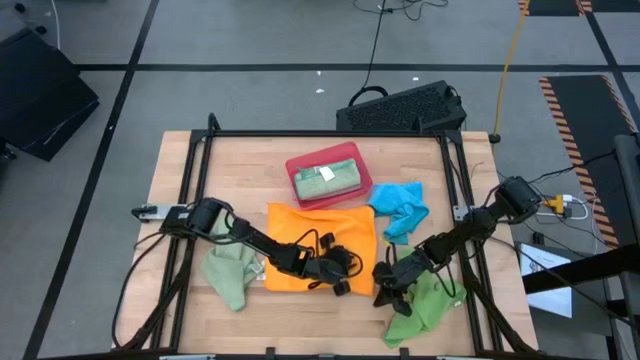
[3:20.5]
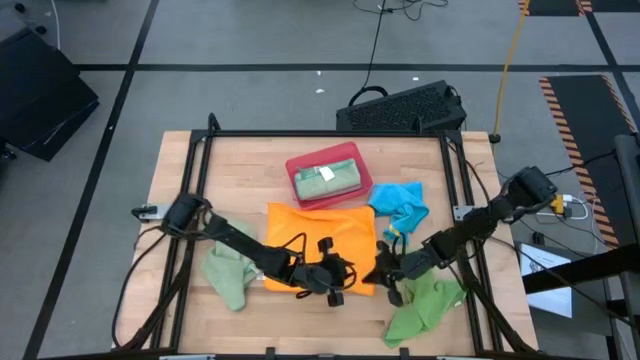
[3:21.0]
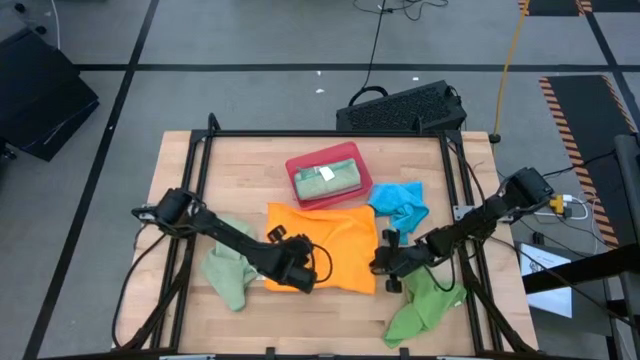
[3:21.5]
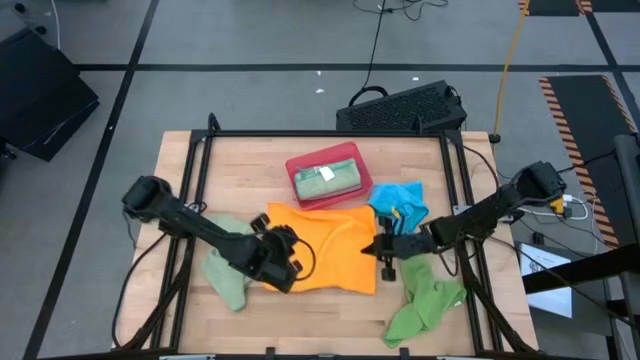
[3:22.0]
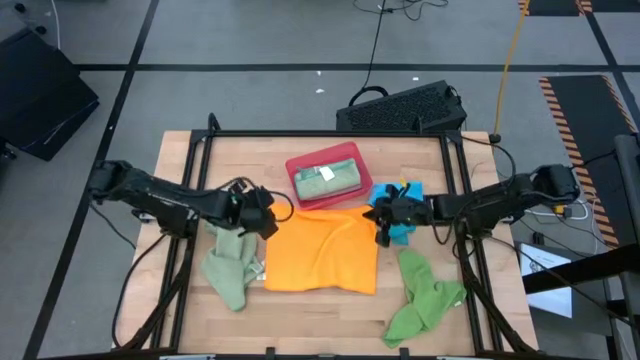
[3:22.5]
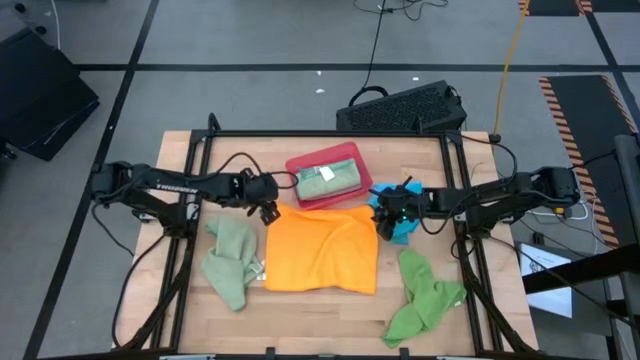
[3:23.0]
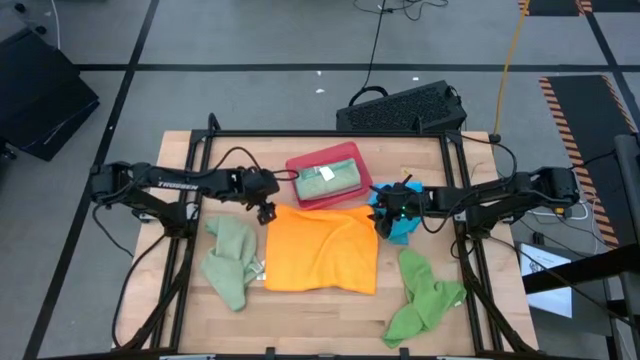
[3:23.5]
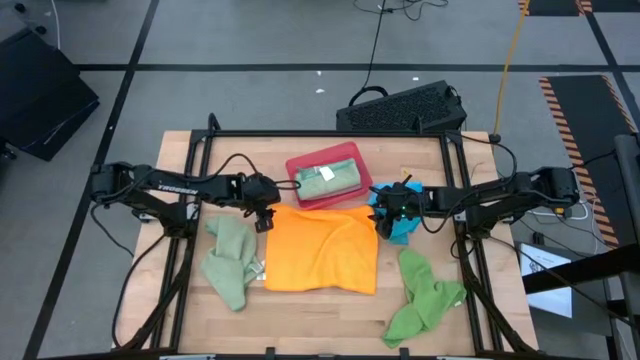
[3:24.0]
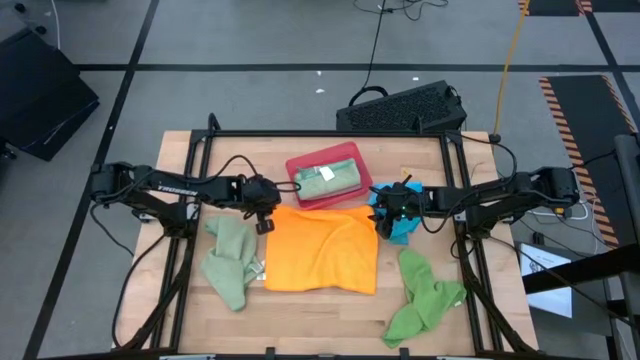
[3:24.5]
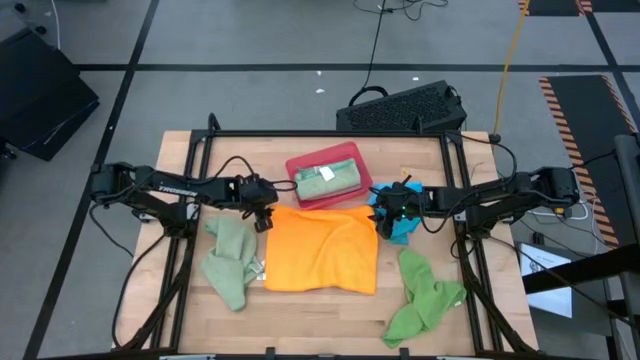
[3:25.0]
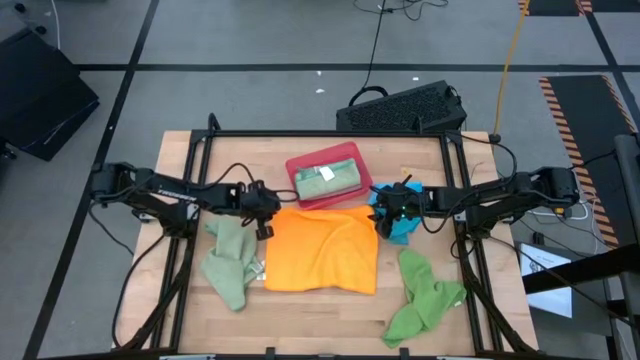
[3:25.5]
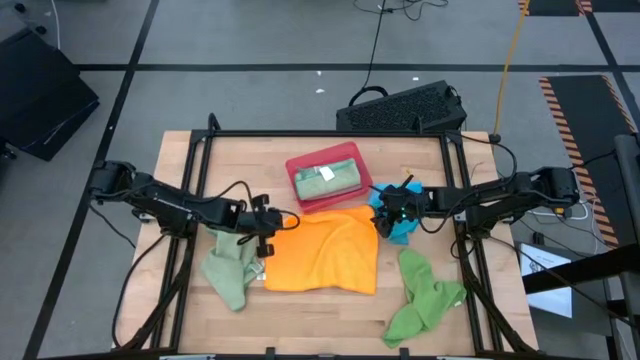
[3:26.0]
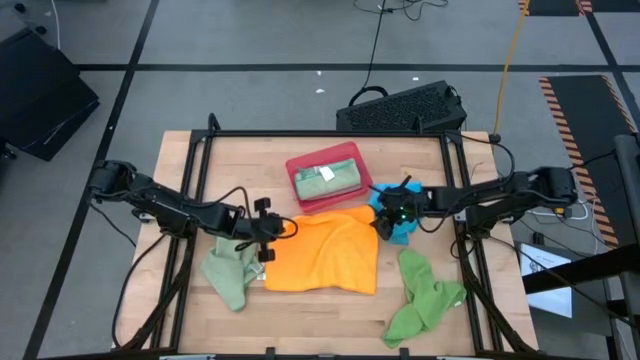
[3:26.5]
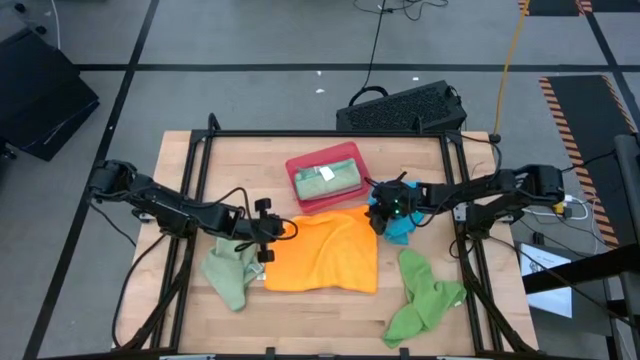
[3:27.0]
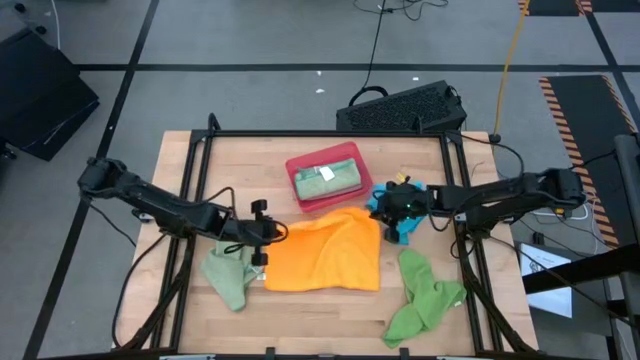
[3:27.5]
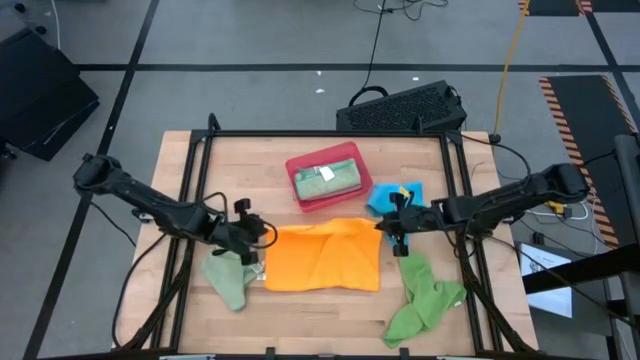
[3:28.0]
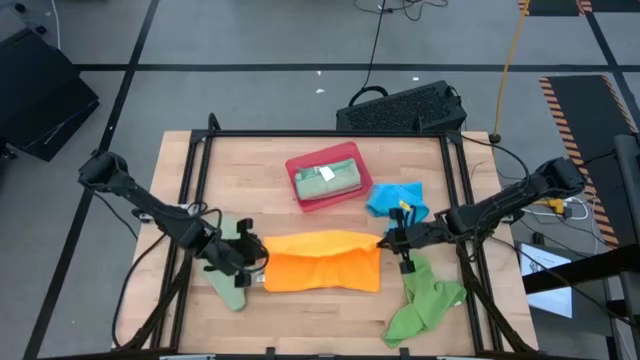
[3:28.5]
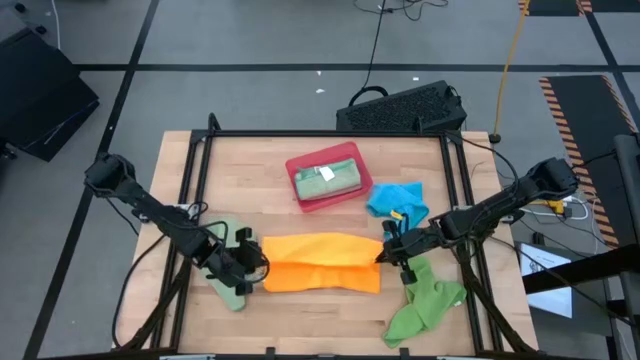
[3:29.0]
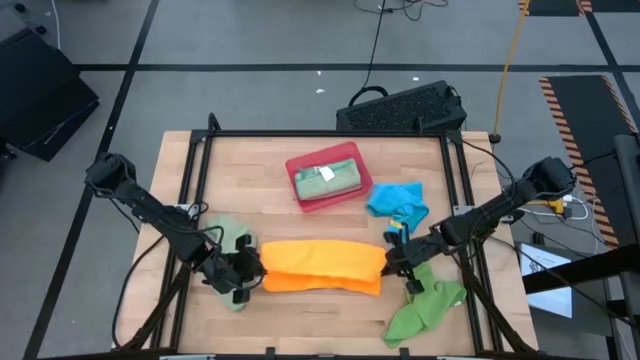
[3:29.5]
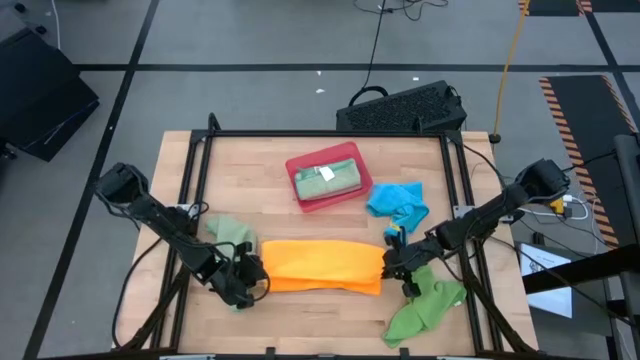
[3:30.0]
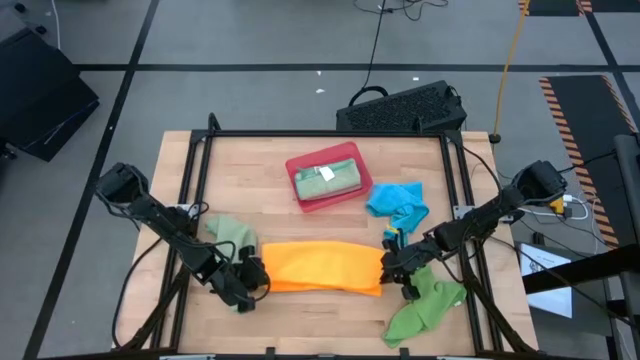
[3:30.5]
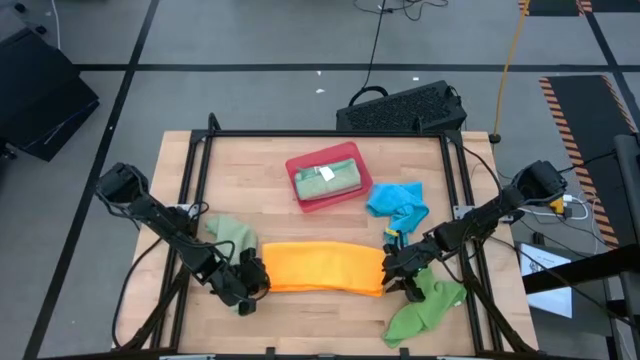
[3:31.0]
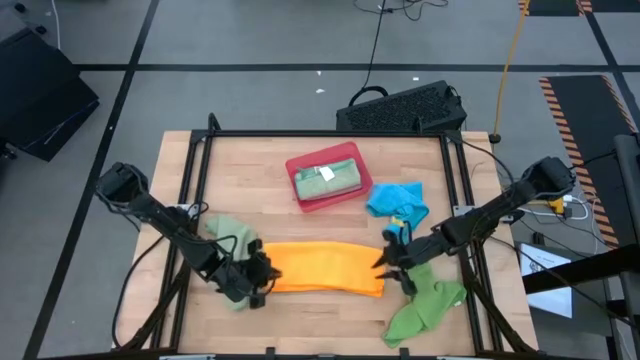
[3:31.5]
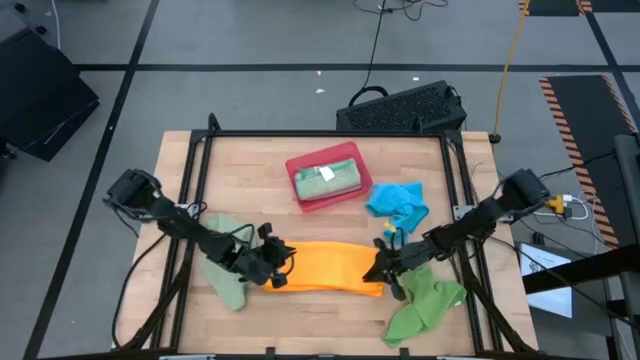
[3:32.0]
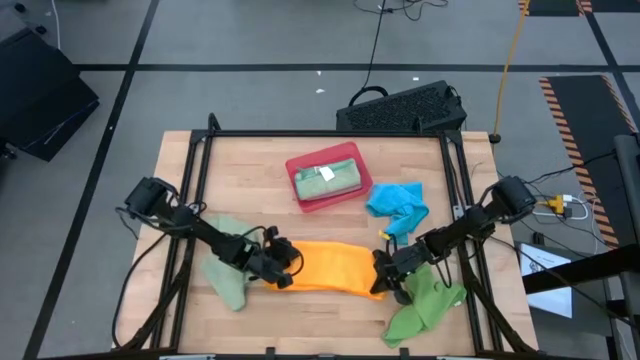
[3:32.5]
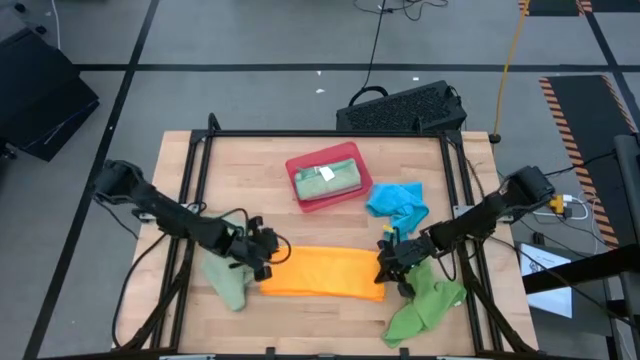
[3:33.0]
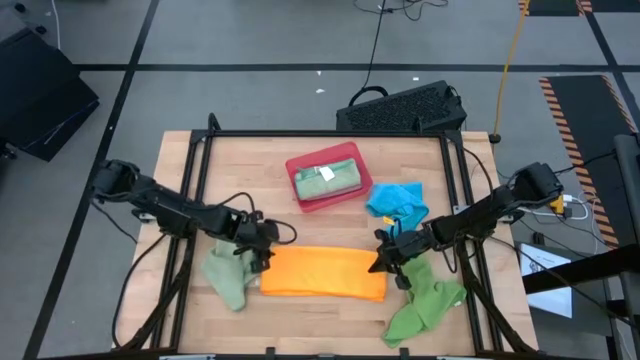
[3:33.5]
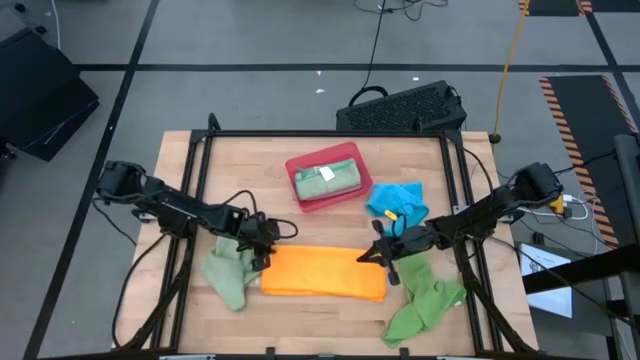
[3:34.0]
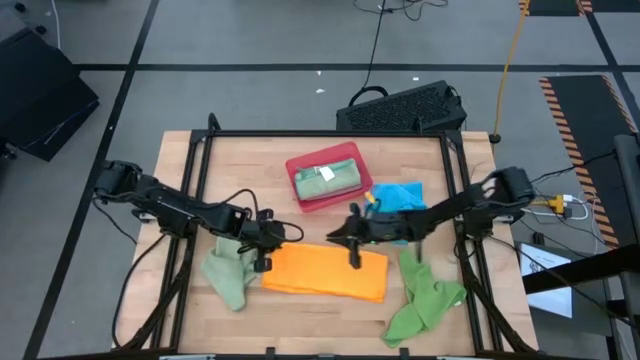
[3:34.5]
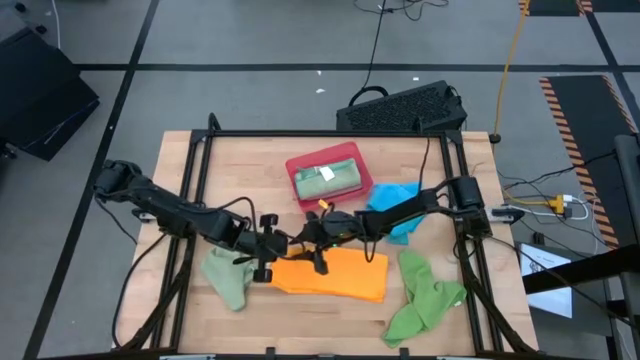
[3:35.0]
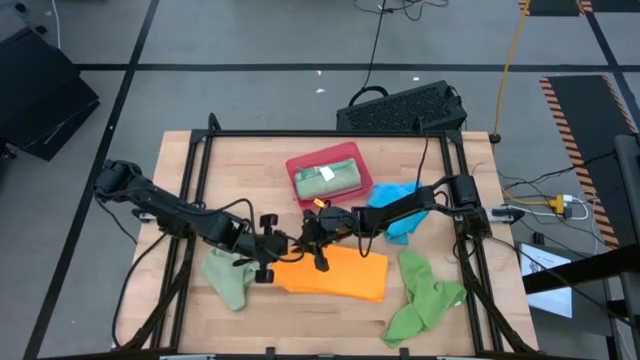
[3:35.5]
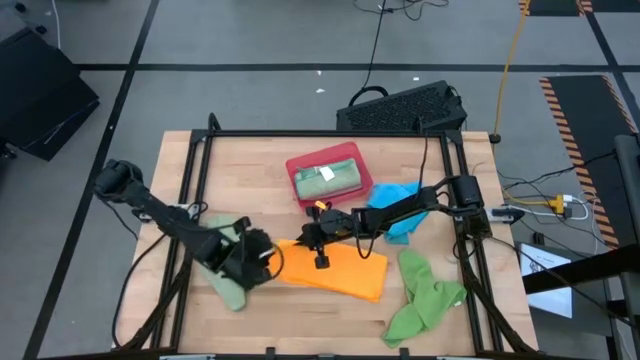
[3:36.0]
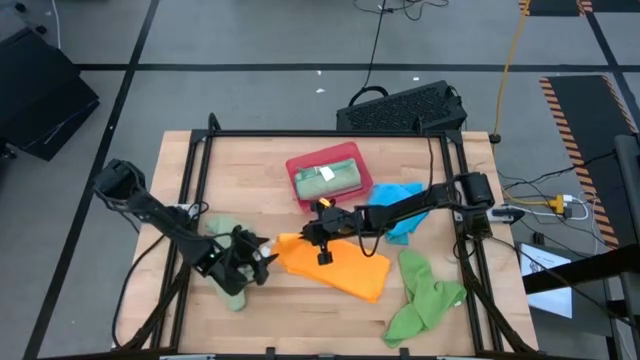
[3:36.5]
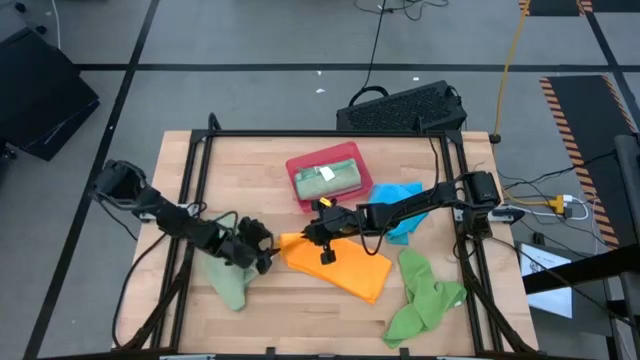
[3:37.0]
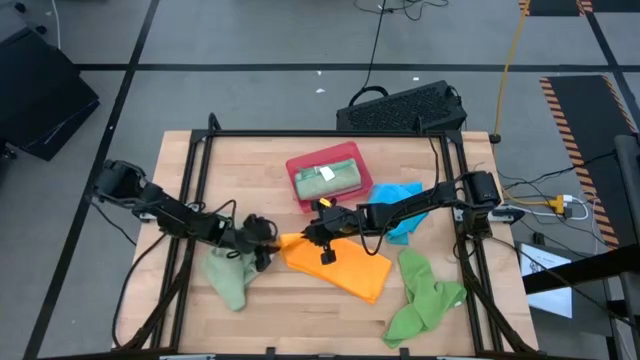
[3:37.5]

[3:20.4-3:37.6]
Task: Fold microfiber towels
Fold the yellow microfiber cloth

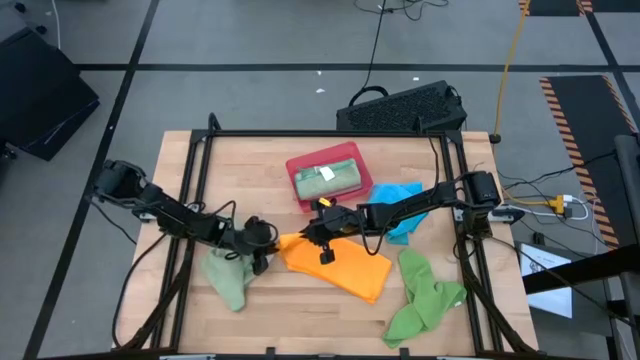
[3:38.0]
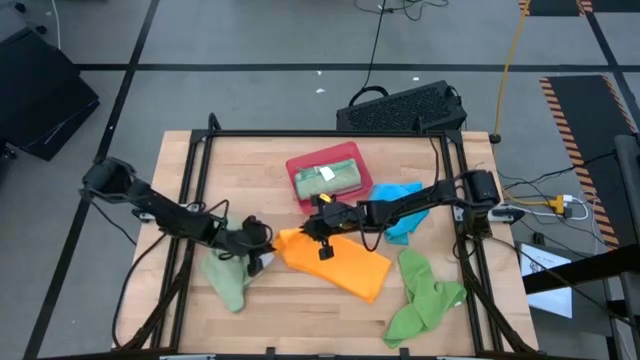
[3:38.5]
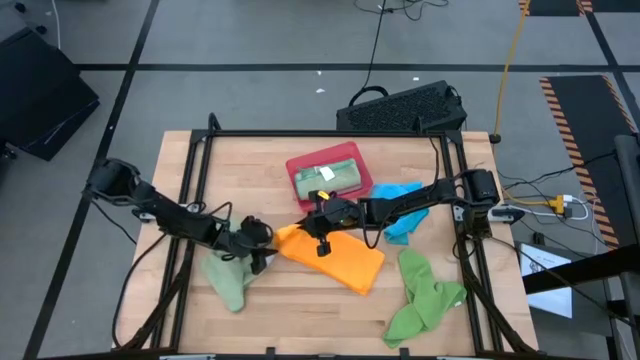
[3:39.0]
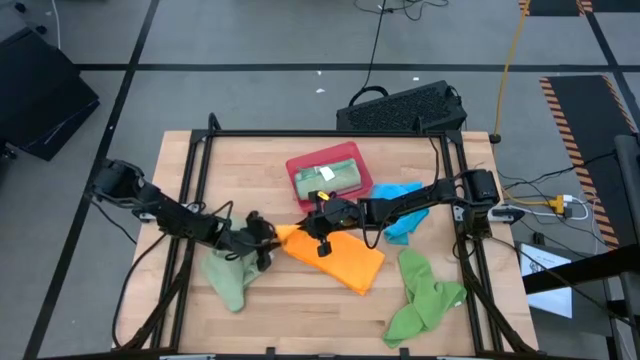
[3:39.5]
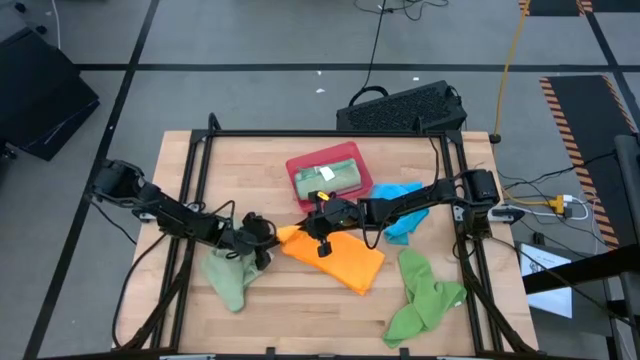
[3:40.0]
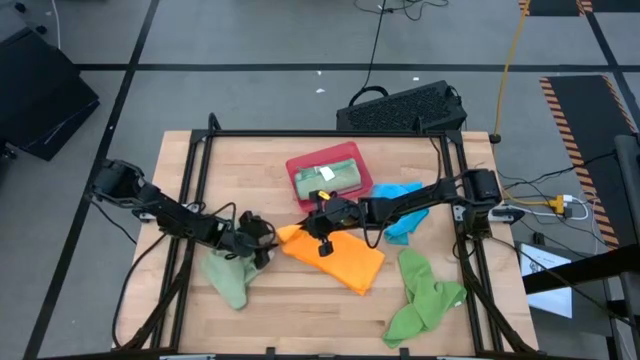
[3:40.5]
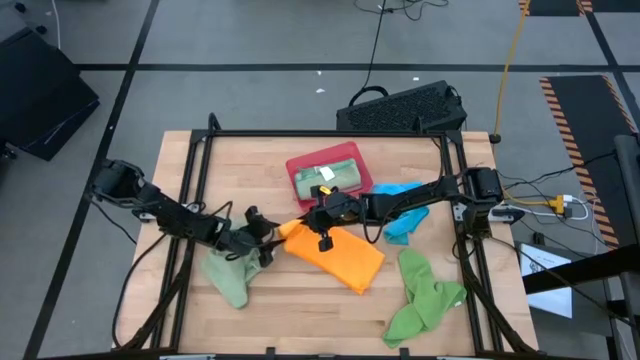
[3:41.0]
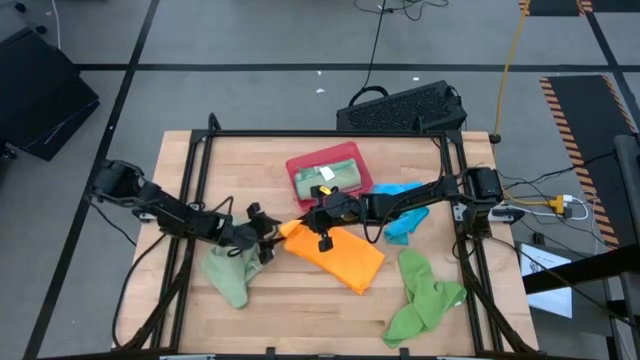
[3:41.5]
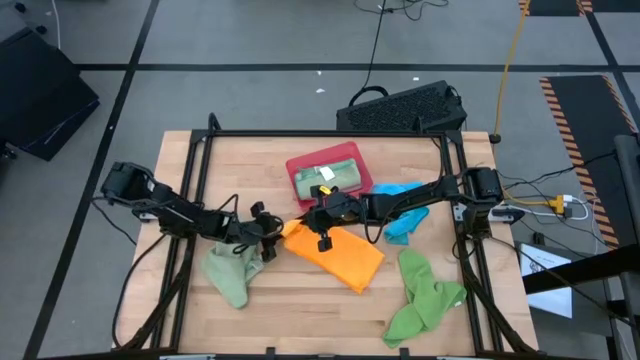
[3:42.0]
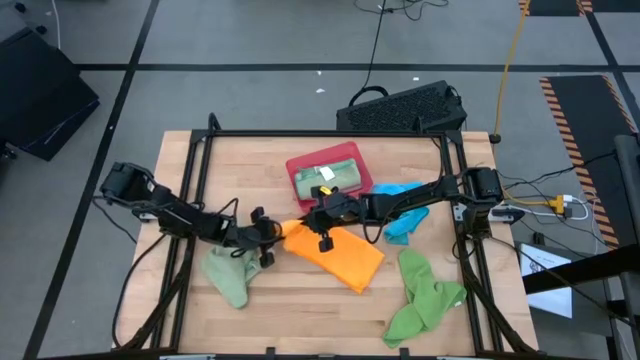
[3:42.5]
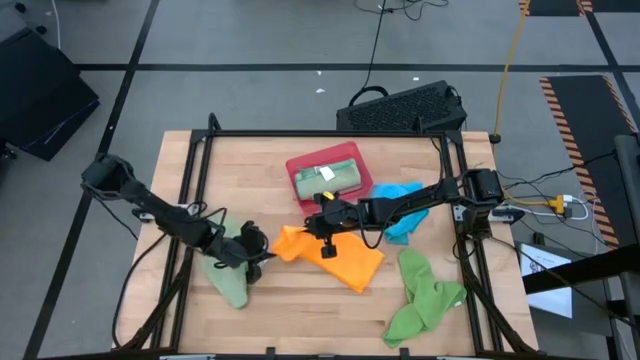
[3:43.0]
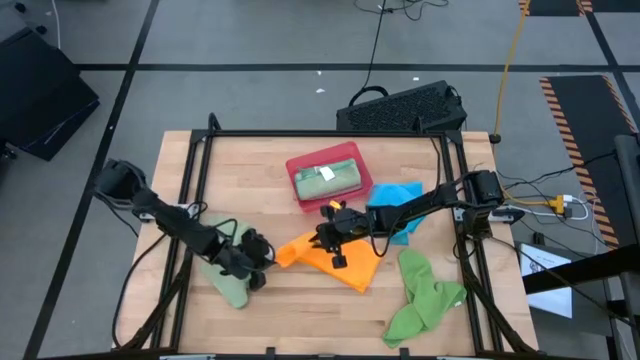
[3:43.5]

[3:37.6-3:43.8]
Fold the yellow microfiber cloth
